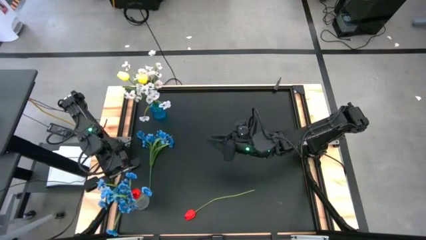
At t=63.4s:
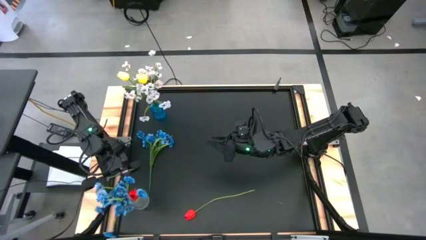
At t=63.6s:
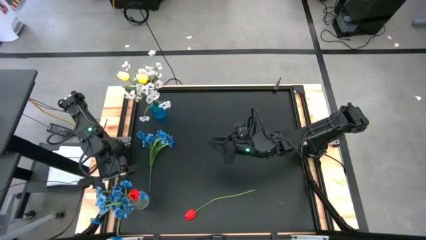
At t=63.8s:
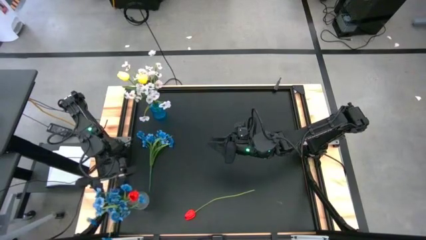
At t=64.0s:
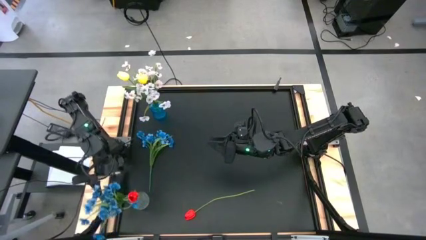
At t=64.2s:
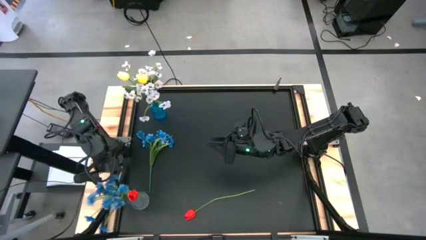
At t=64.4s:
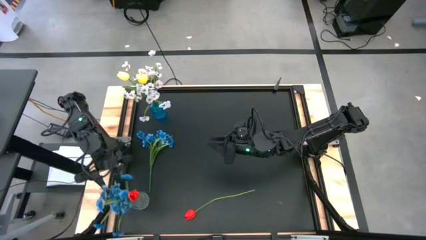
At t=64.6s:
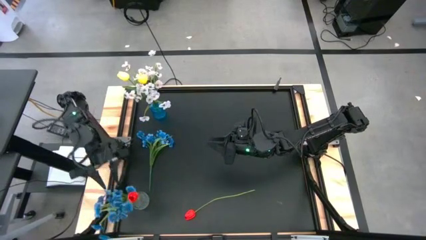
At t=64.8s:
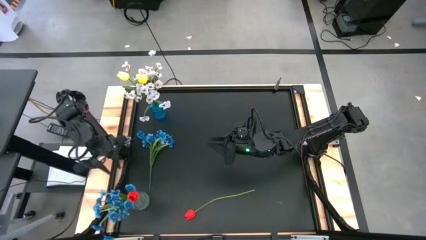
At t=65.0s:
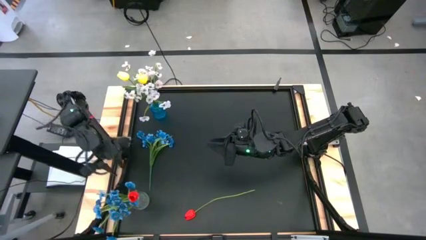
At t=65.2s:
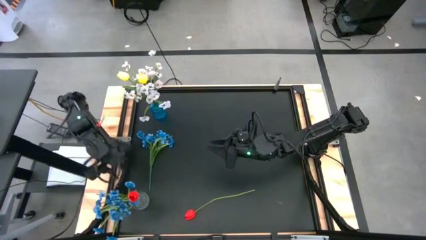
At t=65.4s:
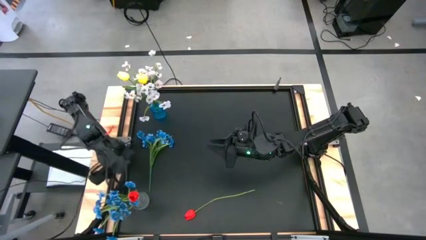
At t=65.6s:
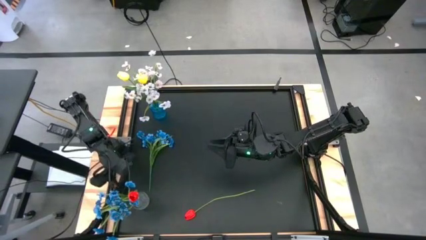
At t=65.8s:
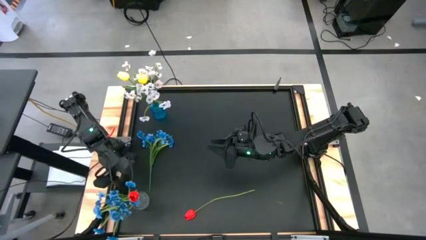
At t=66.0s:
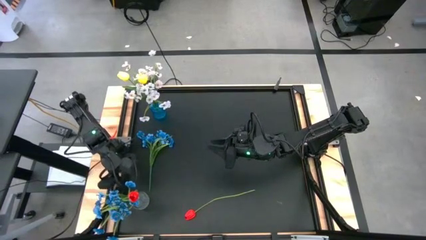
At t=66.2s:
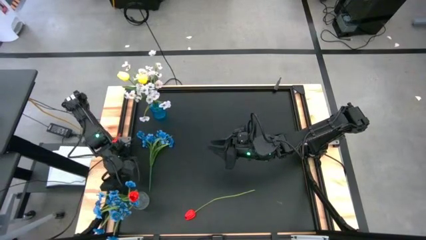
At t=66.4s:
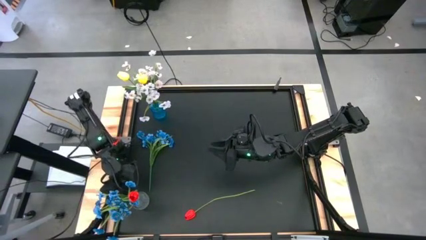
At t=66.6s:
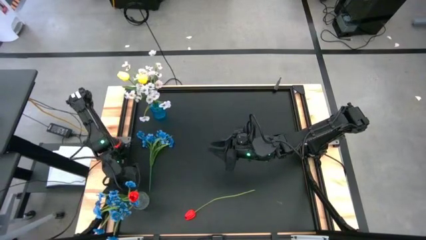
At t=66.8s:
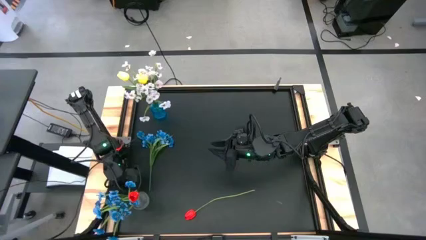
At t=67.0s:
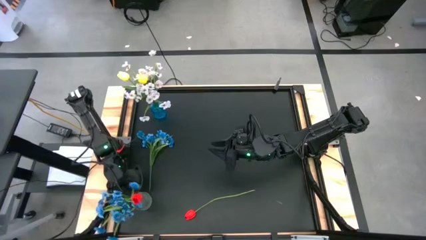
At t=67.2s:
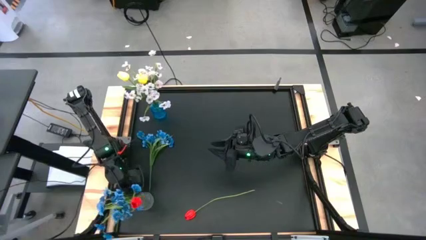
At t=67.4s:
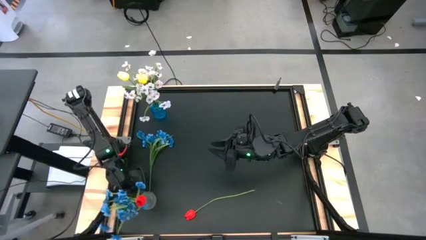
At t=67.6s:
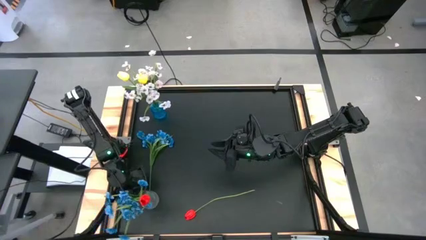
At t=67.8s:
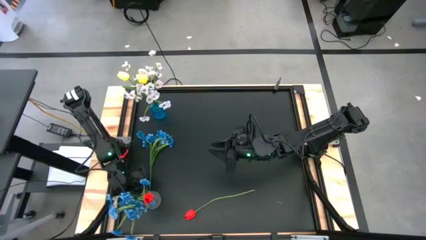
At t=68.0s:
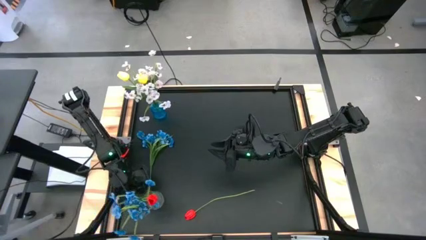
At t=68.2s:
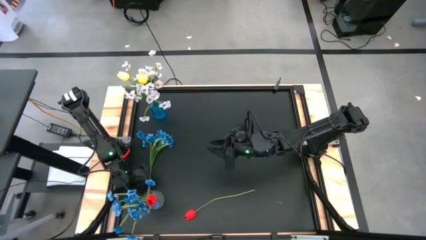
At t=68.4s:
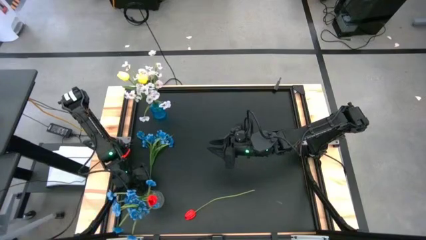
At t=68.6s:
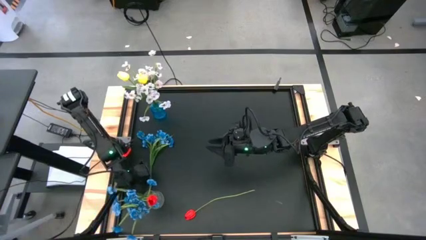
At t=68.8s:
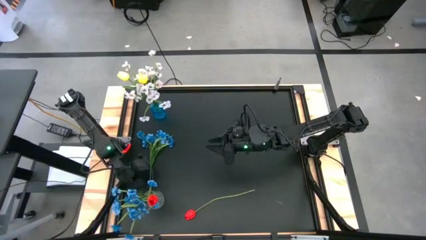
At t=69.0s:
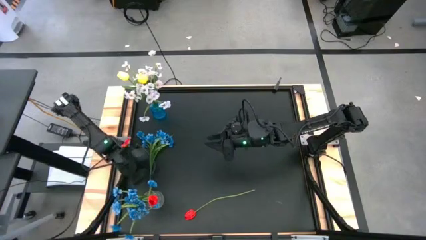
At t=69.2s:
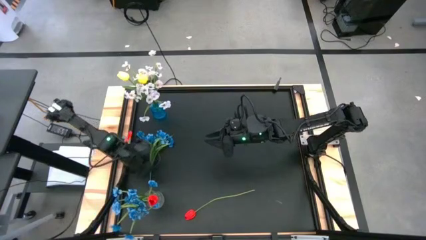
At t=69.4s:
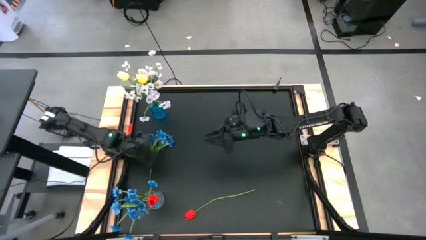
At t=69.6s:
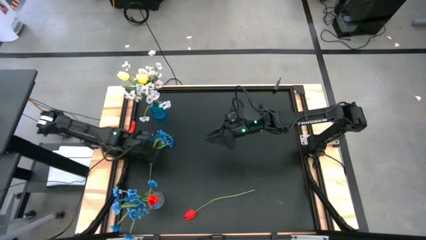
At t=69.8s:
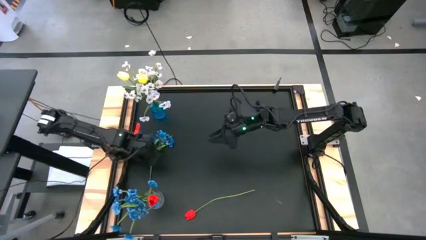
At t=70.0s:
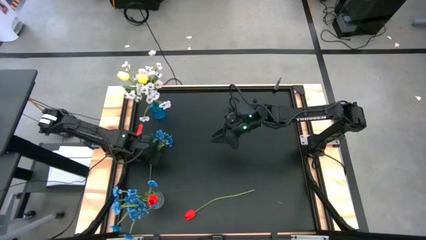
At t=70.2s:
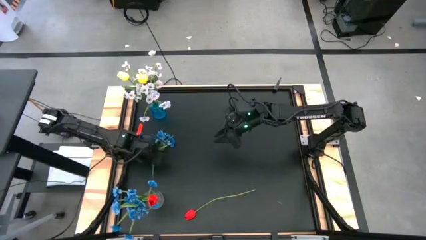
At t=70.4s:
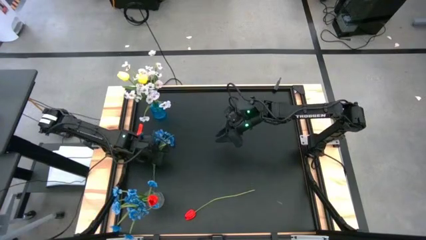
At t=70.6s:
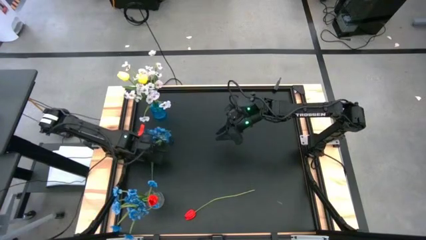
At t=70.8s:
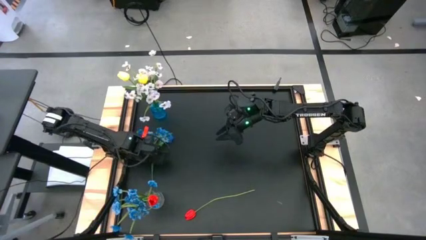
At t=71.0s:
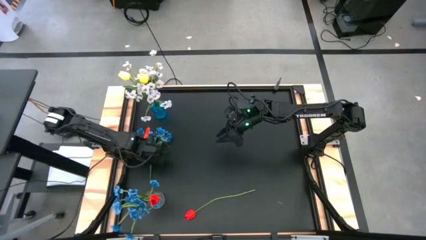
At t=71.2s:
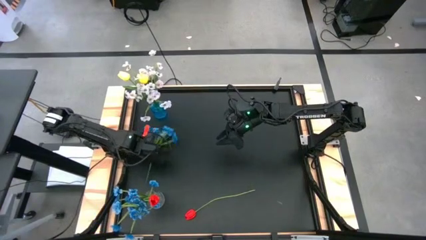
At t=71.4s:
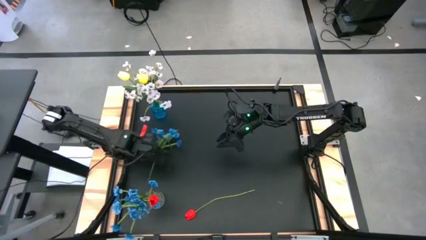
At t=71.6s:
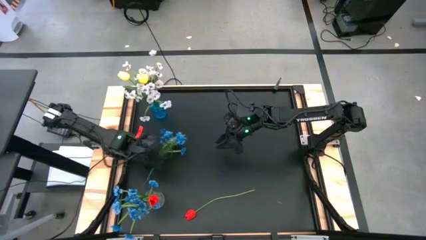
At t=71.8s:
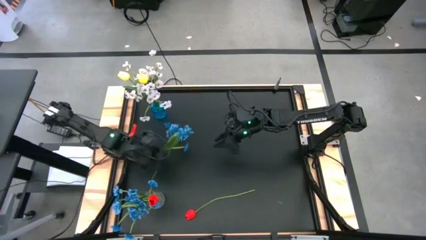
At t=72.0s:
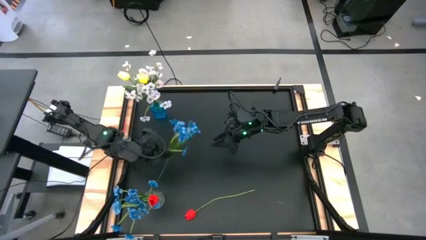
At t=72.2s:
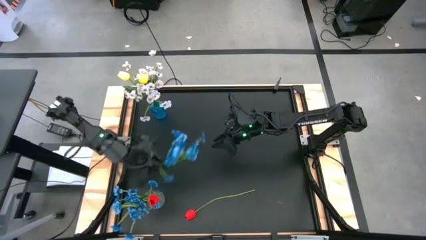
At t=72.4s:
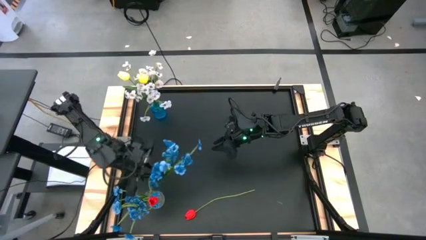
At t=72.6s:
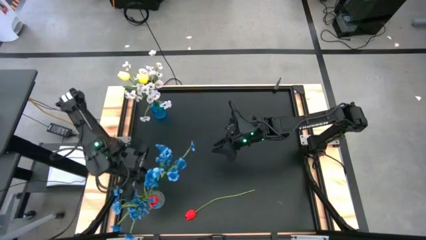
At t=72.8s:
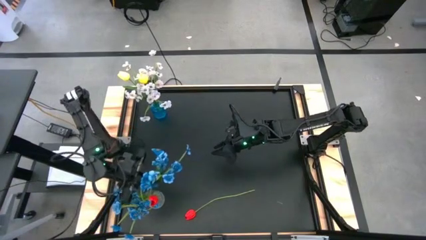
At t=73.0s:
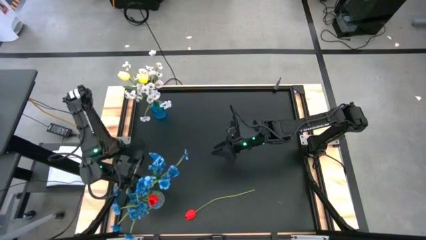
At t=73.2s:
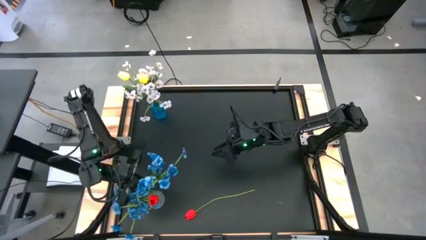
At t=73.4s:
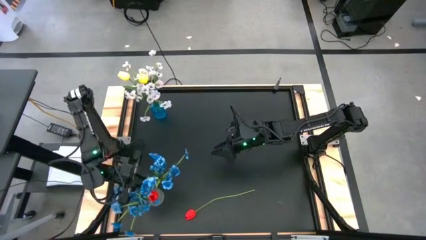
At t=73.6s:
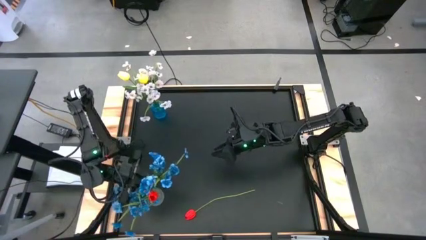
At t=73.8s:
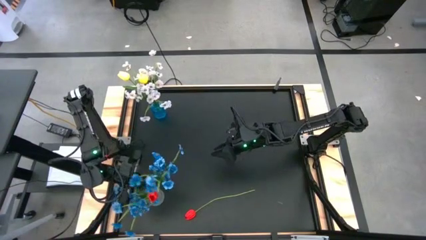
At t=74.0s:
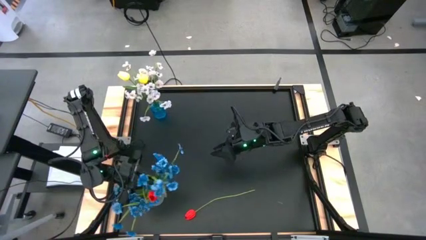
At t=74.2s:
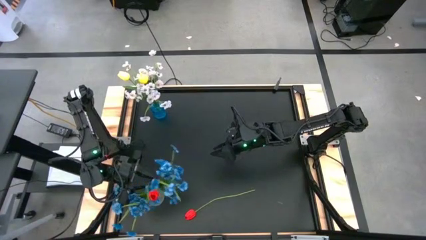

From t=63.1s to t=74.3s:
Task: Sort flowers into vase by color
Put the blue flowers into the transparent vase
